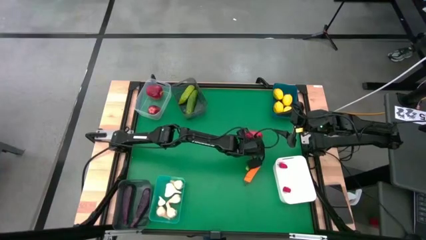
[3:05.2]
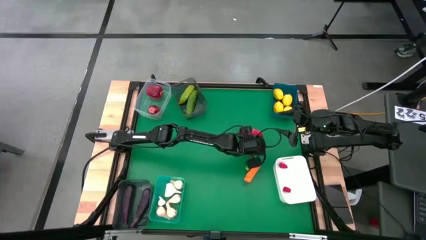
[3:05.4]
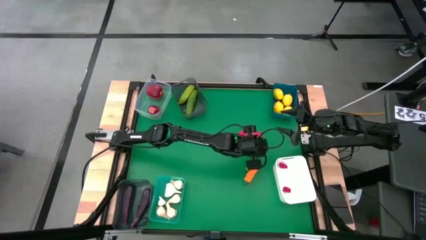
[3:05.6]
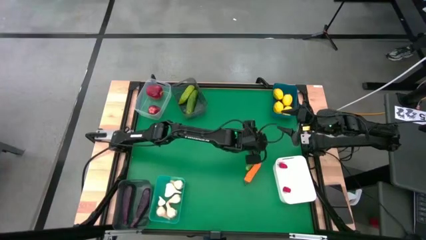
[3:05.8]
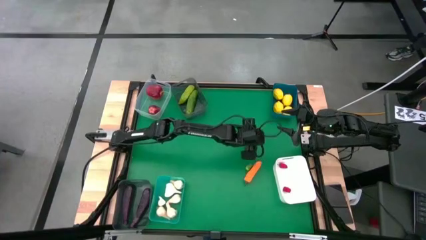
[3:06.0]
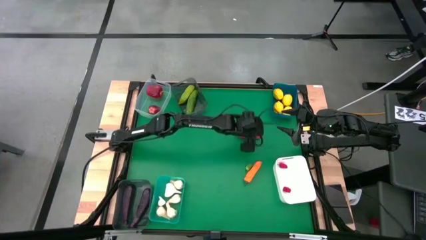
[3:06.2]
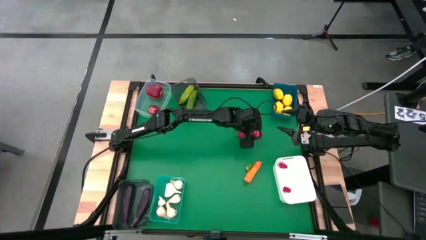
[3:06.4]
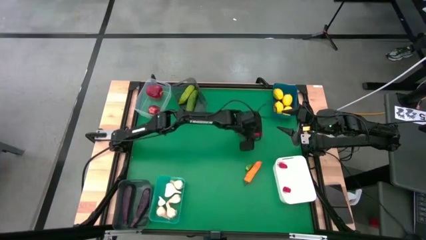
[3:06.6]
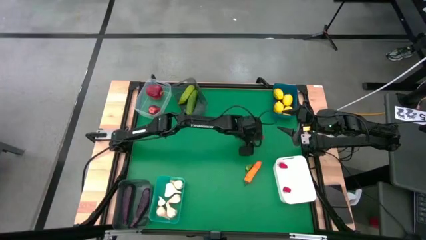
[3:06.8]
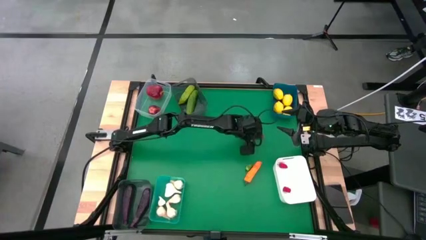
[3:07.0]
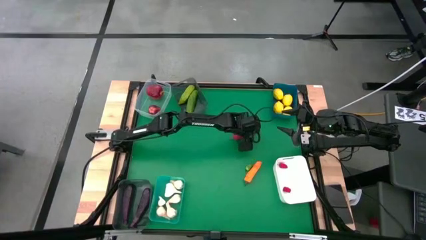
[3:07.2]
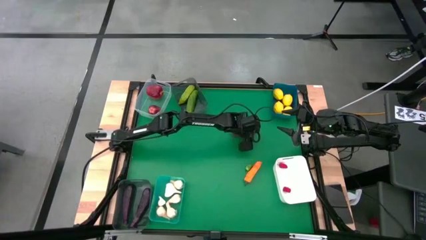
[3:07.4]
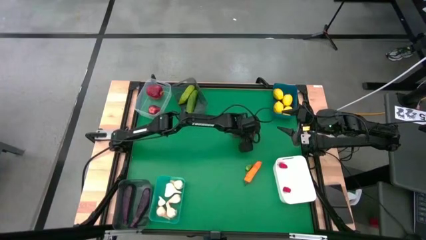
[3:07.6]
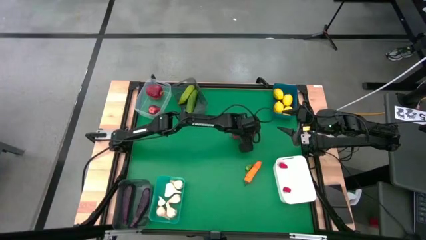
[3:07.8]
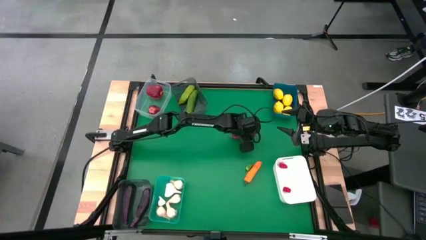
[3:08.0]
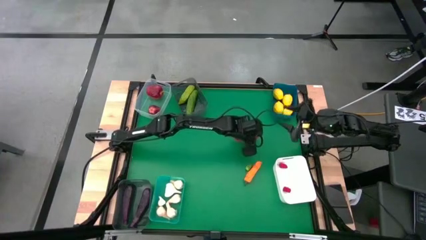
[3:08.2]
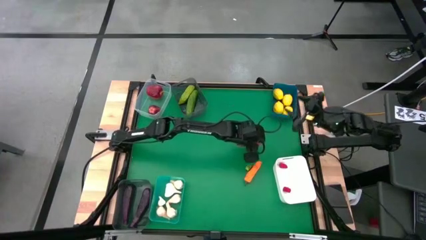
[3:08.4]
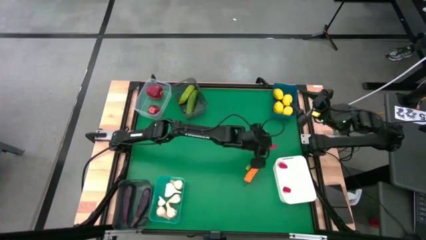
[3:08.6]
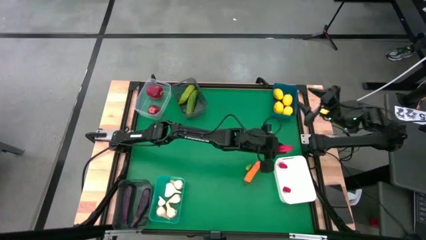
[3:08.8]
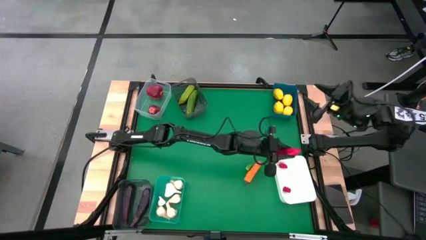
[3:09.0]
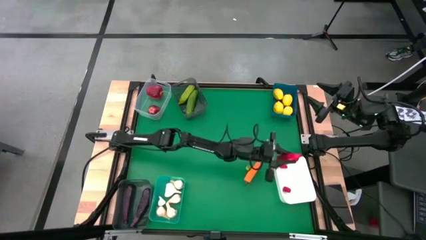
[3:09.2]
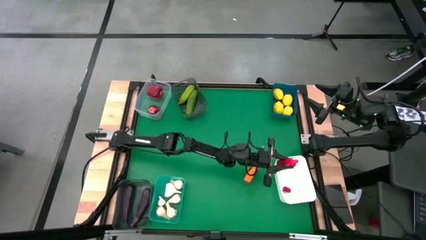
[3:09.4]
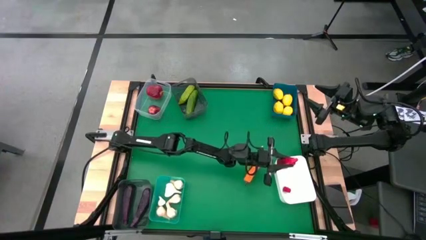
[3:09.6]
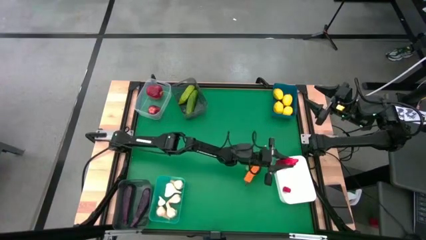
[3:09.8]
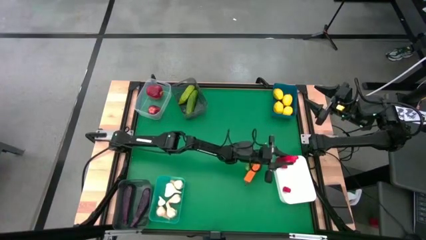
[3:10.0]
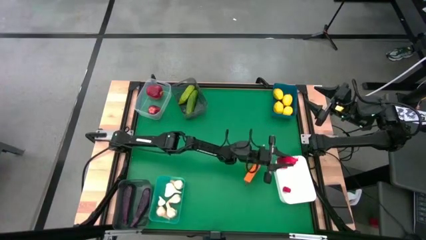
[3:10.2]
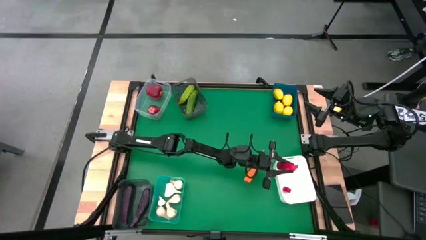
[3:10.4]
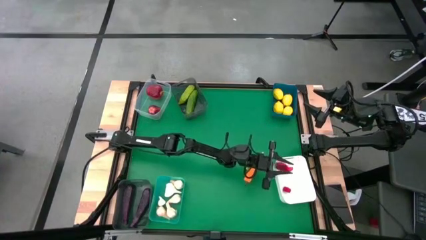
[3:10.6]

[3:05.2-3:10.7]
Task: Sort produce into baskets
Put the red chili pepper into the white bin

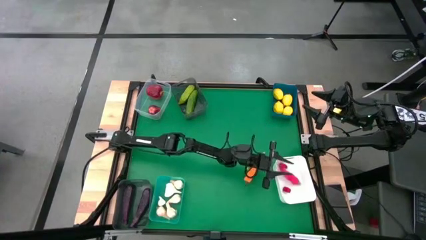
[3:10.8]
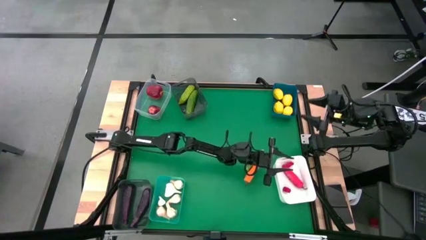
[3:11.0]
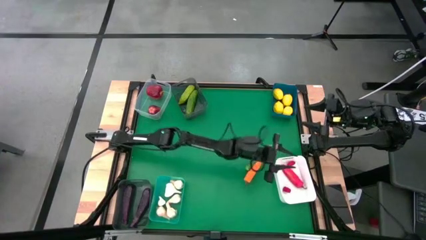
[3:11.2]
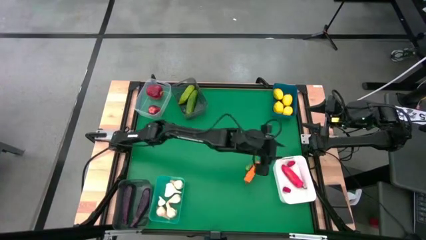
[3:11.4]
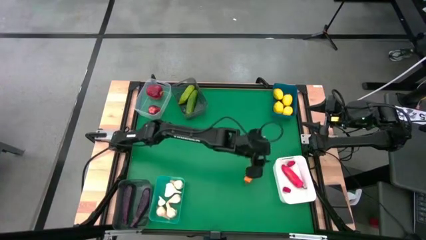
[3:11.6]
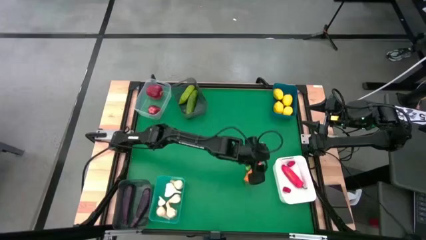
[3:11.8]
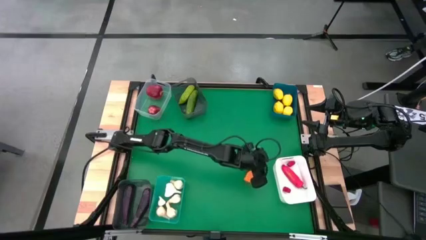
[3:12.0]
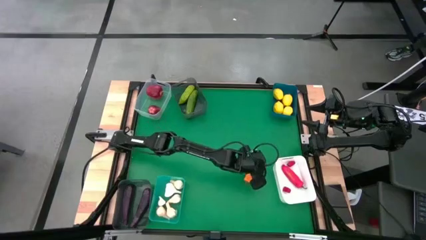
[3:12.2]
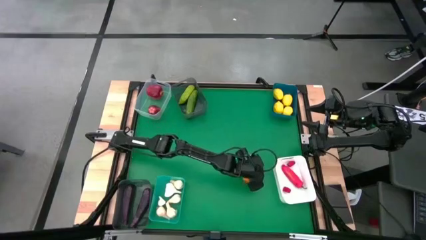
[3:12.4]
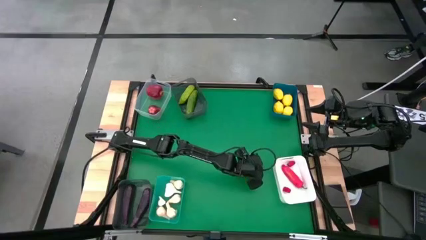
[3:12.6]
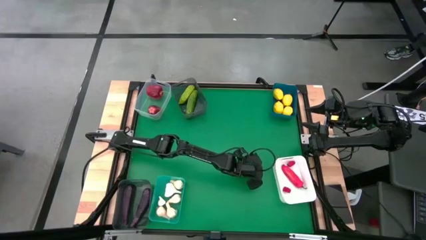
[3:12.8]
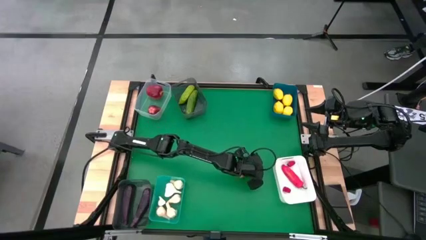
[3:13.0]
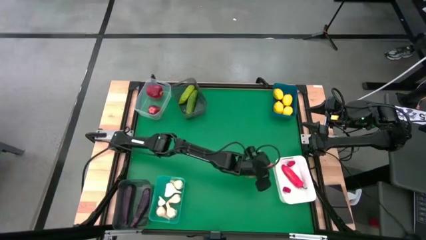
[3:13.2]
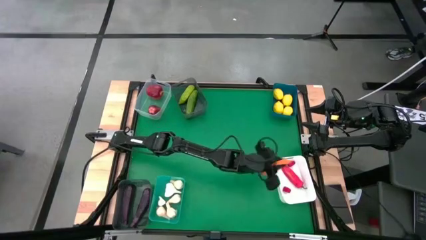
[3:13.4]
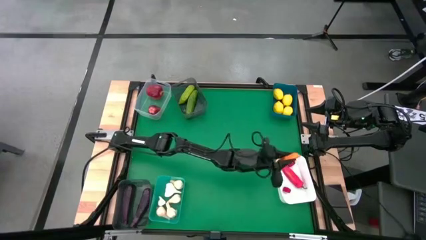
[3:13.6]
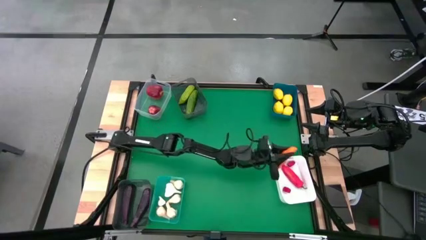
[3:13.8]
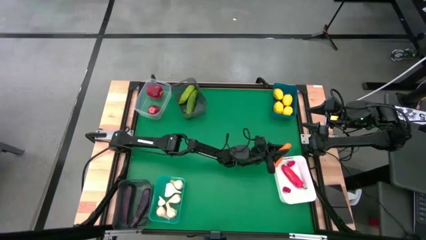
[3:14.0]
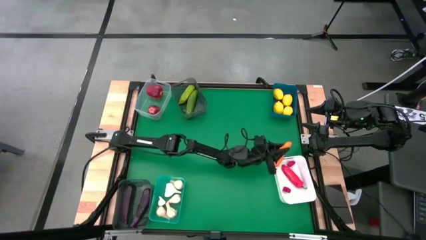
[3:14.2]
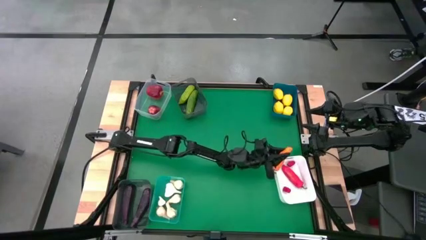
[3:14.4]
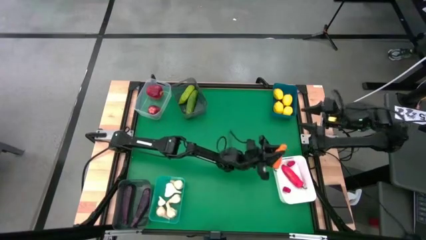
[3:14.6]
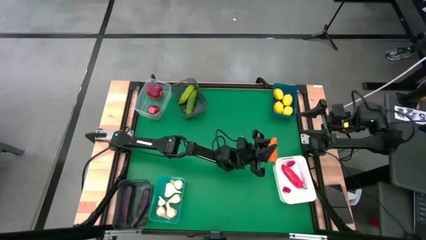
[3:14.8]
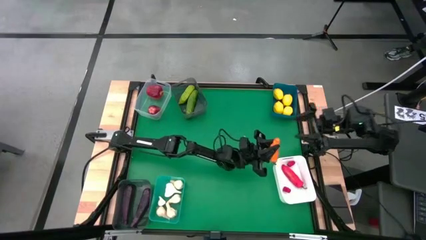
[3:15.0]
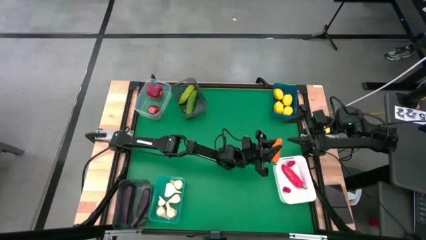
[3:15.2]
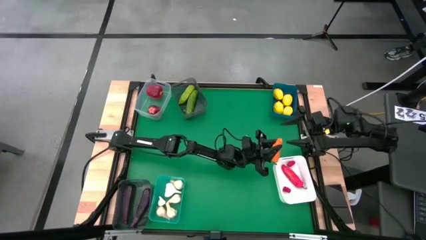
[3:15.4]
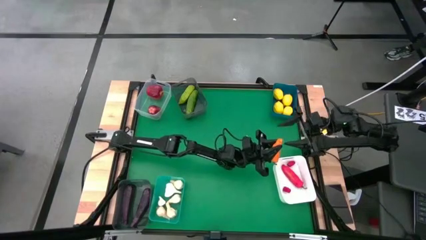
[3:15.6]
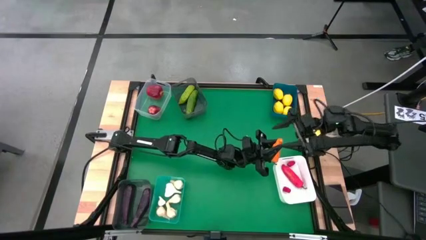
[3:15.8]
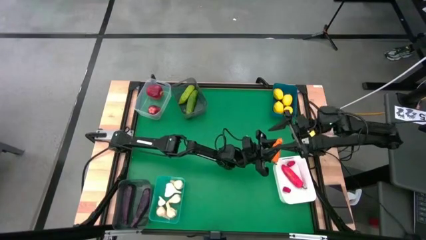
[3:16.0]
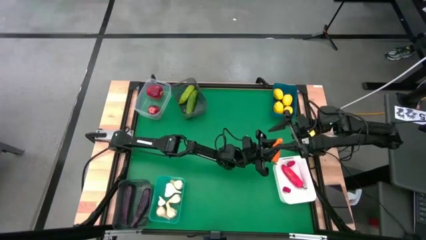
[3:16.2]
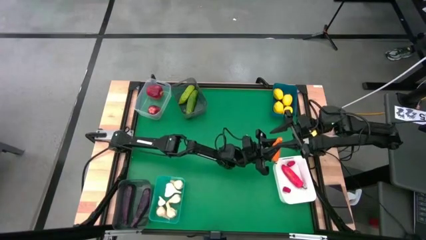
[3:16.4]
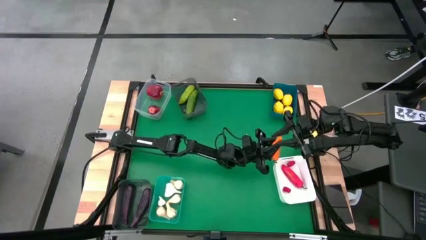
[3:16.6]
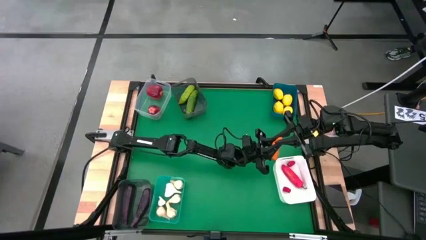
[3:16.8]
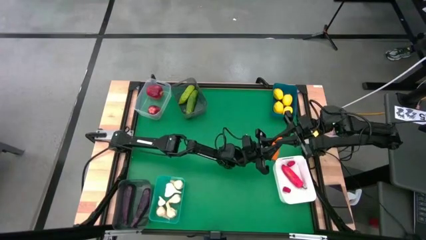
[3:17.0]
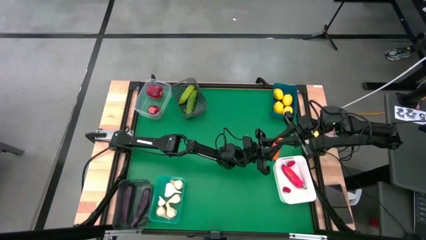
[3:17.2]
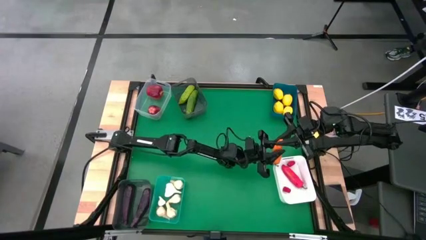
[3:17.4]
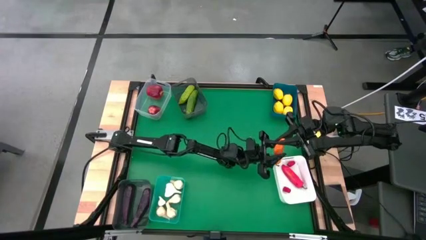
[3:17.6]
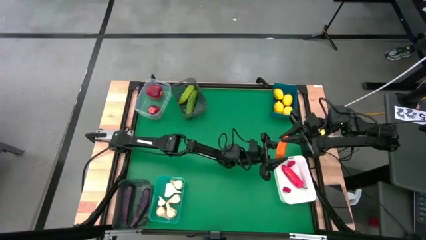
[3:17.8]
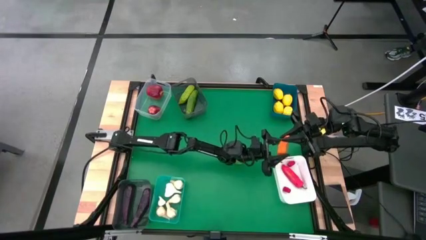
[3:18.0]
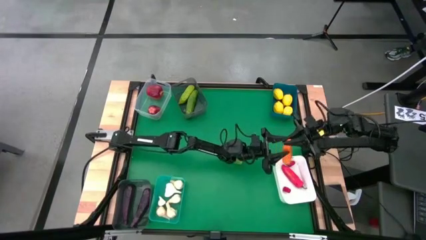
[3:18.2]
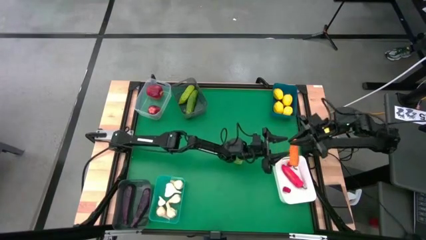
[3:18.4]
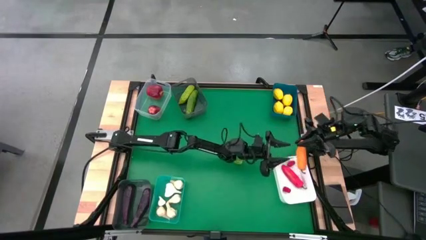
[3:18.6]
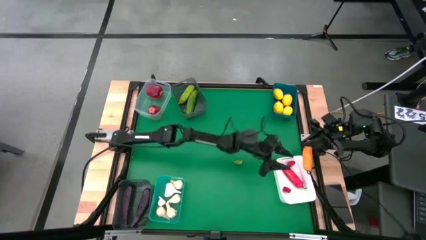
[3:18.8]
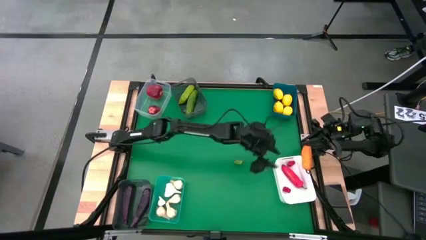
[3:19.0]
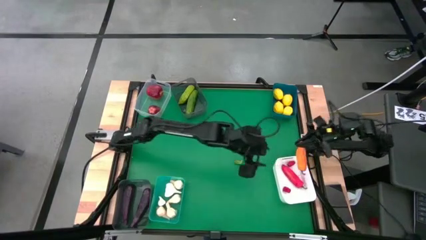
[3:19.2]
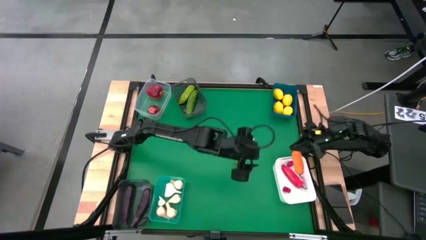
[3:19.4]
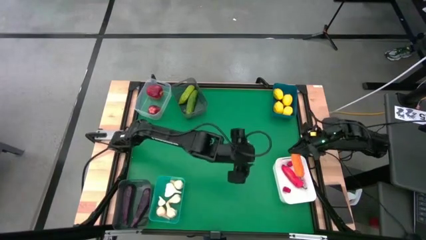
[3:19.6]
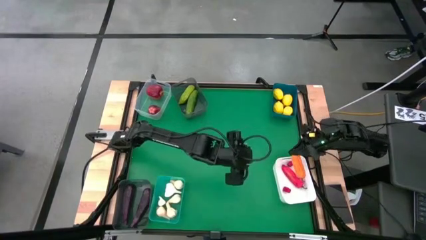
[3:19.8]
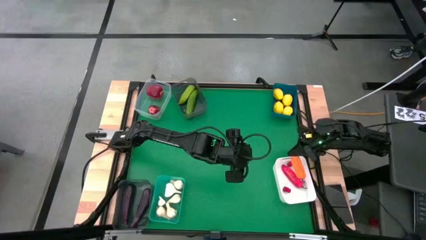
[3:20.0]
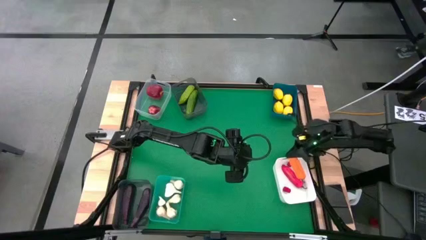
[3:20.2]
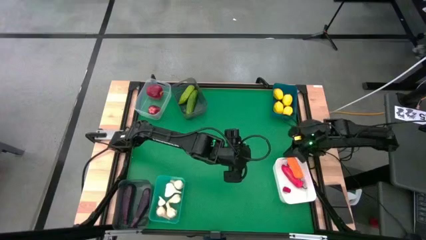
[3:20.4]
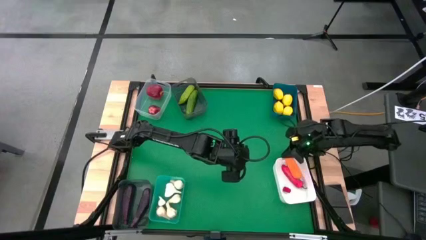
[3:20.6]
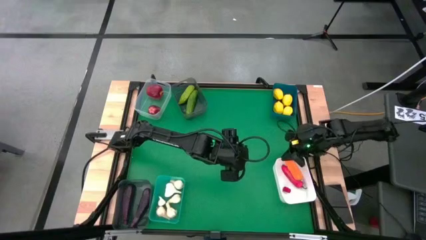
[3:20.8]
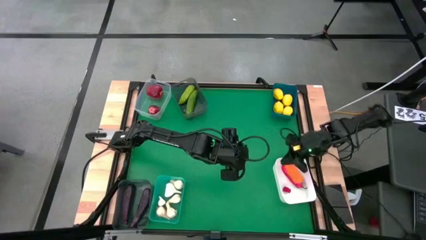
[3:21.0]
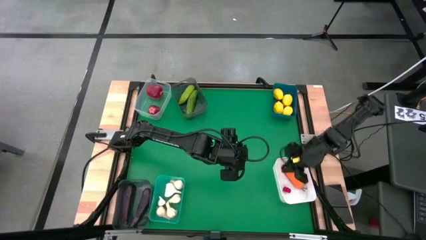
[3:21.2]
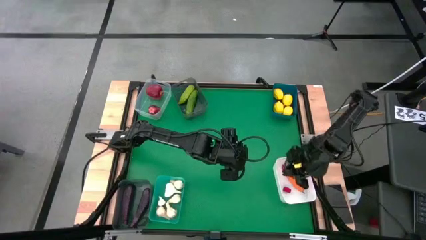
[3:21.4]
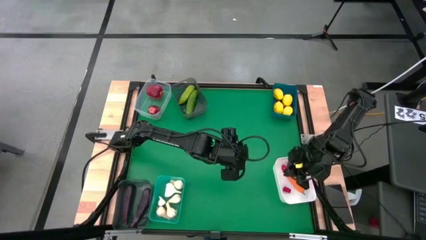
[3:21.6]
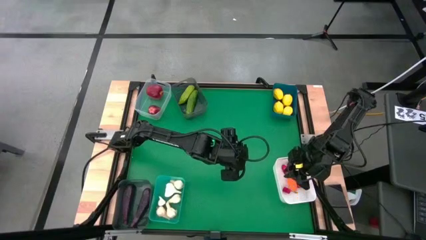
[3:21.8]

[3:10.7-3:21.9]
Put the orange chili pepper into the white bin

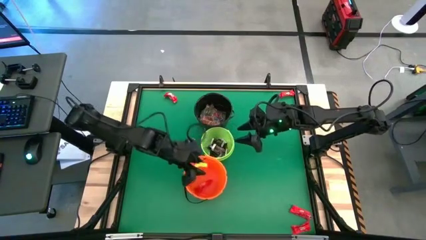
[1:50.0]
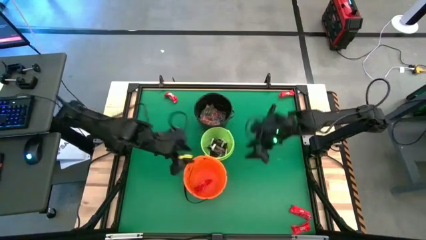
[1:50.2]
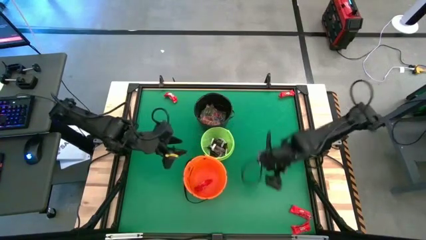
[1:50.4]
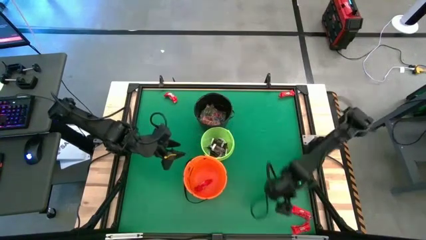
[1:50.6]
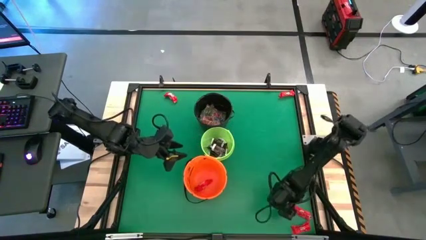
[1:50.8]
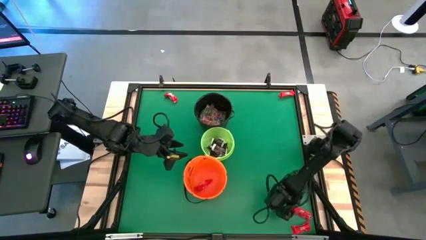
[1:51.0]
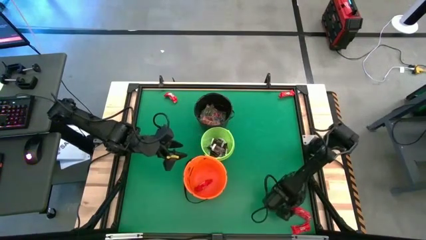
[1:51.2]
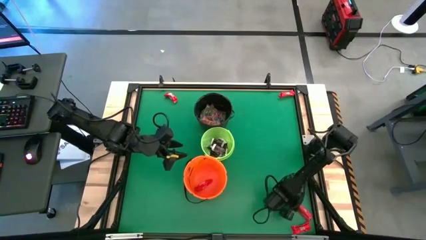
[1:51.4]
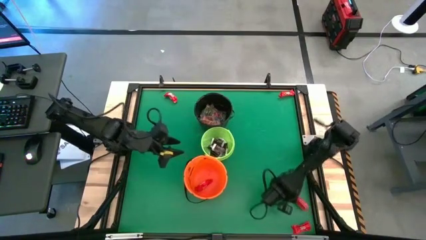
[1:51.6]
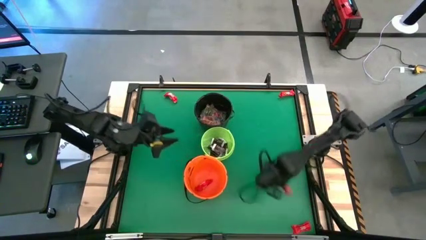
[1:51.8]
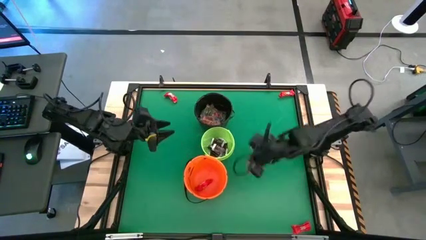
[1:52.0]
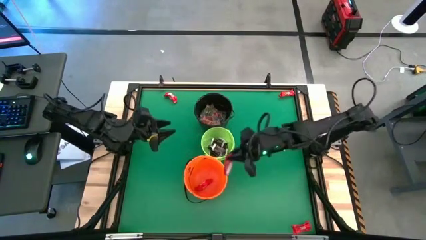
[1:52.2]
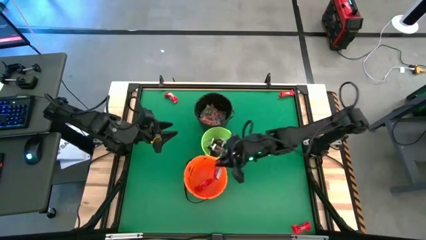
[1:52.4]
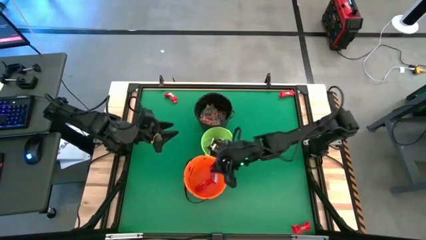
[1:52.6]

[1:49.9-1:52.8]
Task: Sort candy by brand, put in halloween buckets
Put the red chocolate bar into the orange bucket
